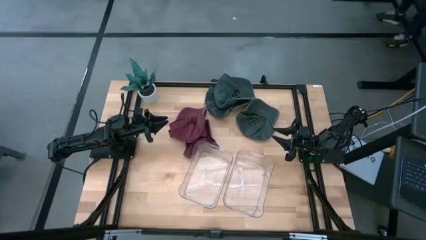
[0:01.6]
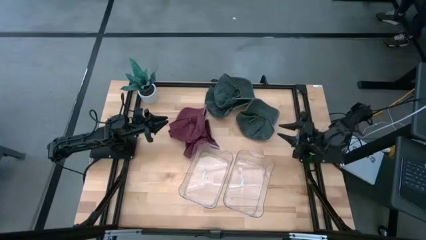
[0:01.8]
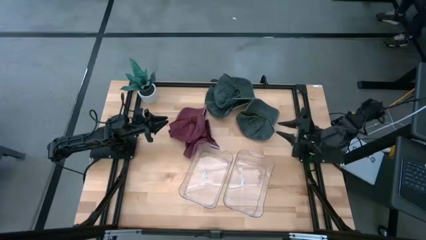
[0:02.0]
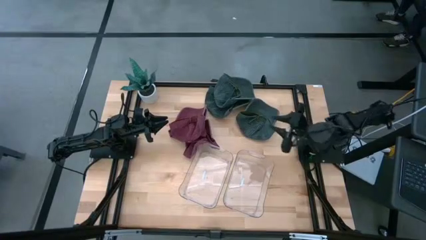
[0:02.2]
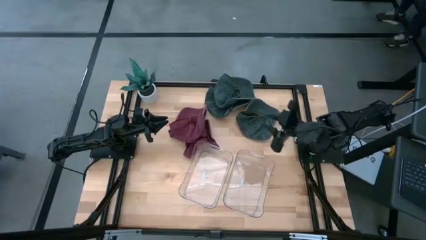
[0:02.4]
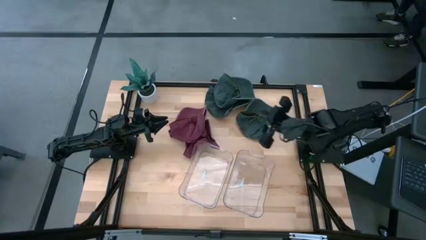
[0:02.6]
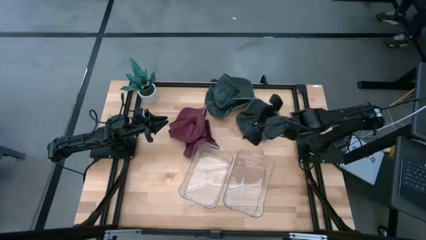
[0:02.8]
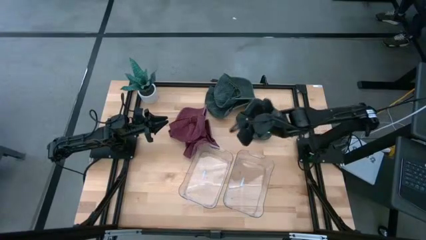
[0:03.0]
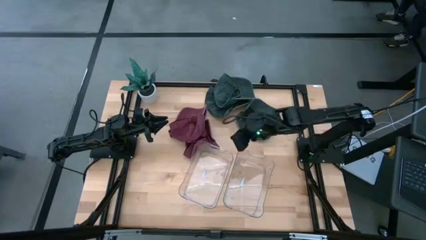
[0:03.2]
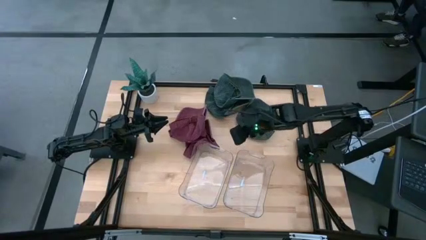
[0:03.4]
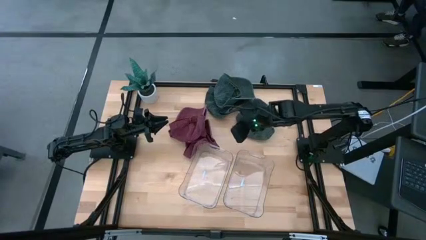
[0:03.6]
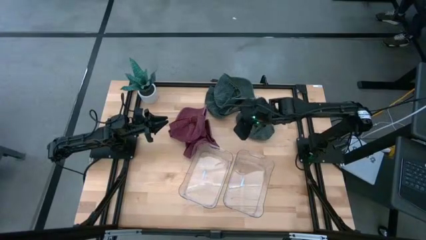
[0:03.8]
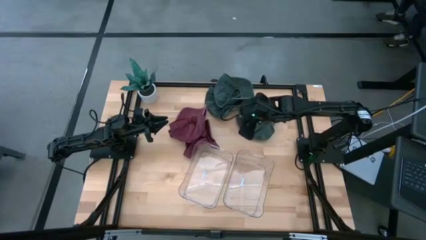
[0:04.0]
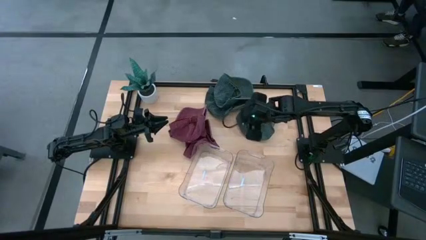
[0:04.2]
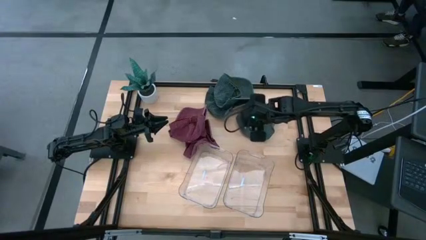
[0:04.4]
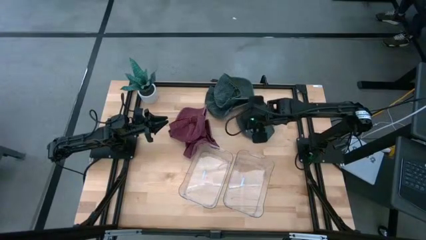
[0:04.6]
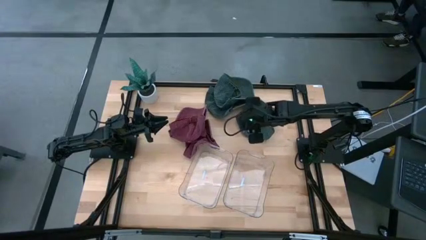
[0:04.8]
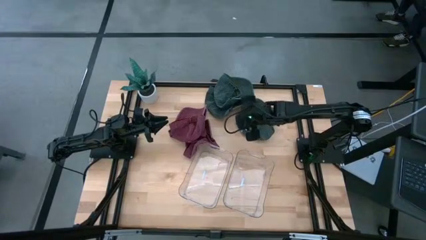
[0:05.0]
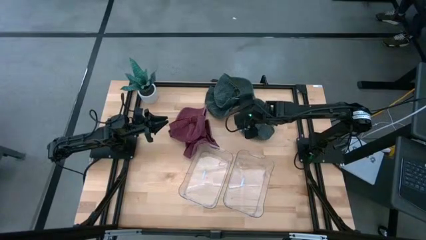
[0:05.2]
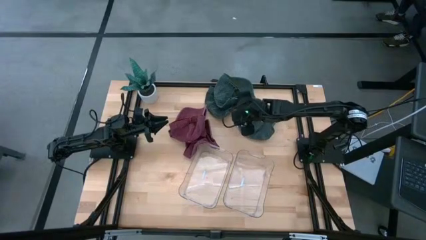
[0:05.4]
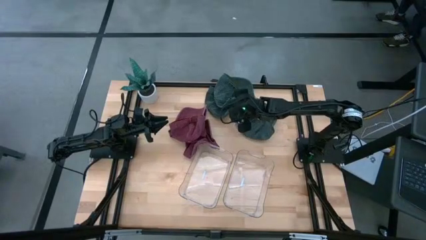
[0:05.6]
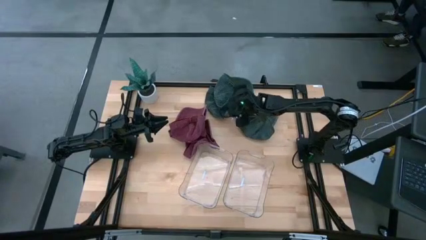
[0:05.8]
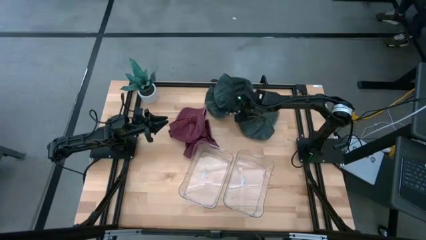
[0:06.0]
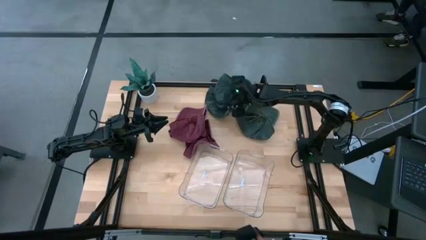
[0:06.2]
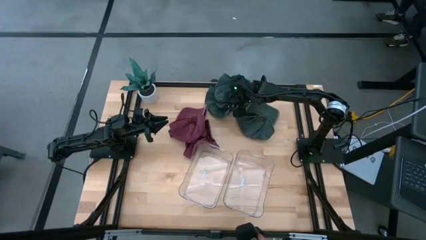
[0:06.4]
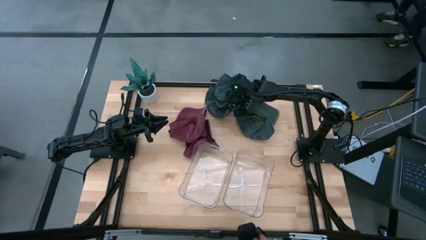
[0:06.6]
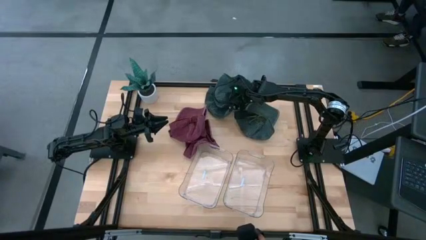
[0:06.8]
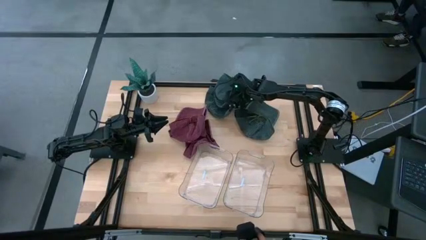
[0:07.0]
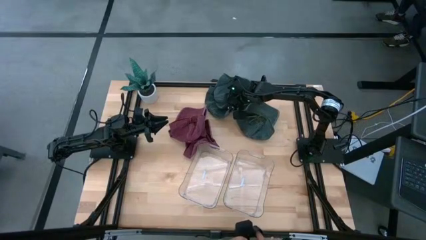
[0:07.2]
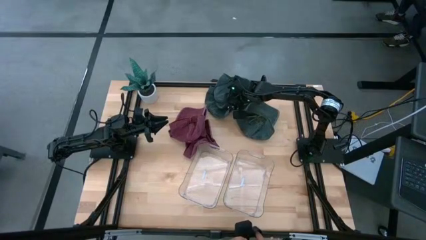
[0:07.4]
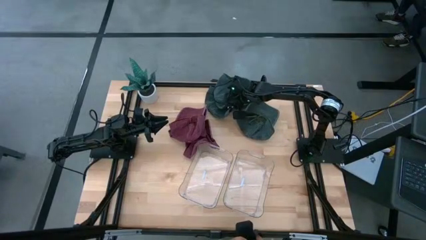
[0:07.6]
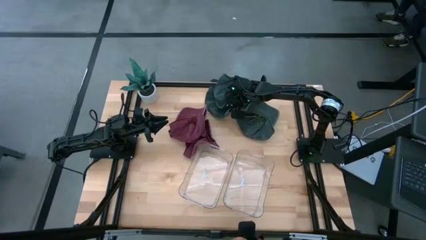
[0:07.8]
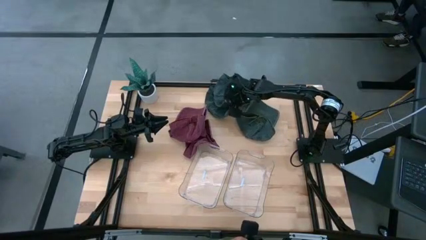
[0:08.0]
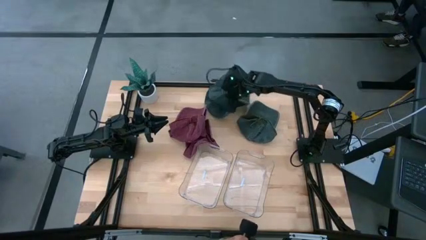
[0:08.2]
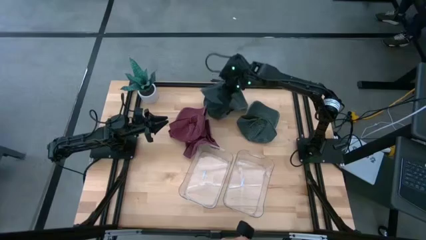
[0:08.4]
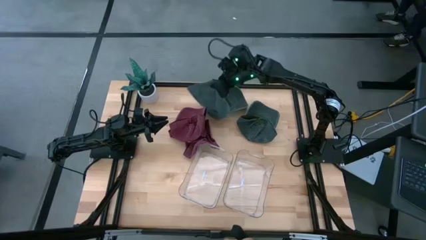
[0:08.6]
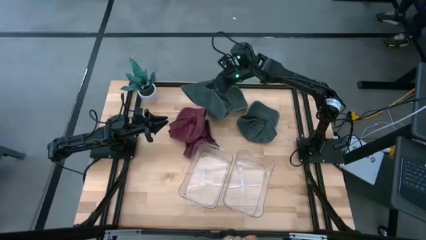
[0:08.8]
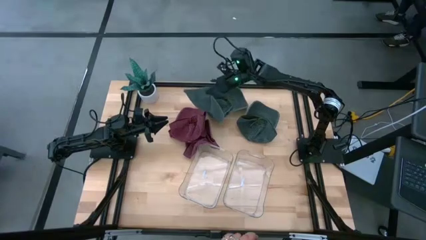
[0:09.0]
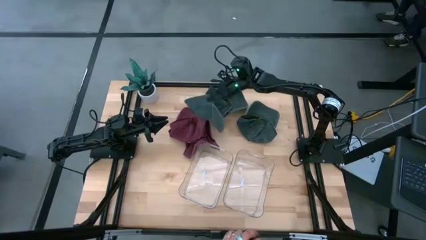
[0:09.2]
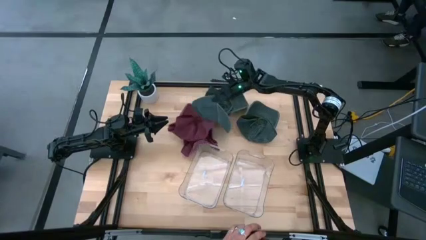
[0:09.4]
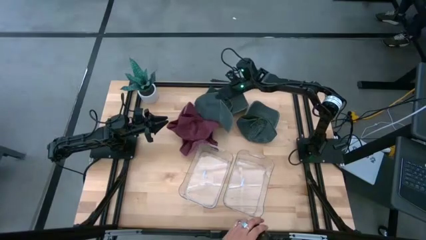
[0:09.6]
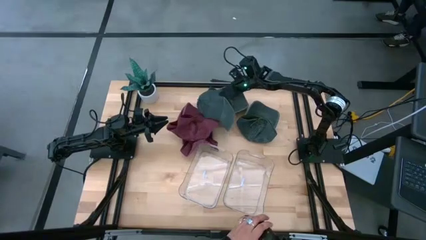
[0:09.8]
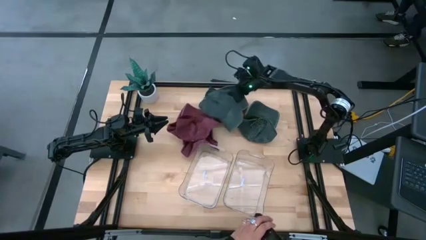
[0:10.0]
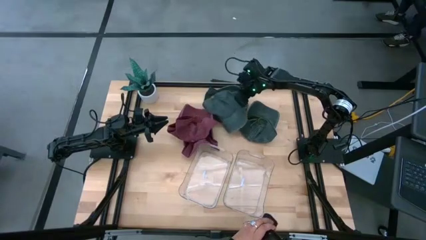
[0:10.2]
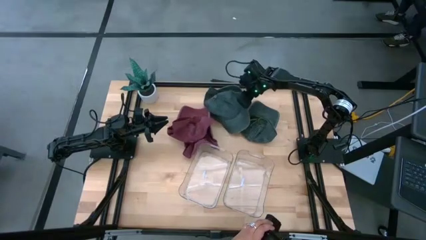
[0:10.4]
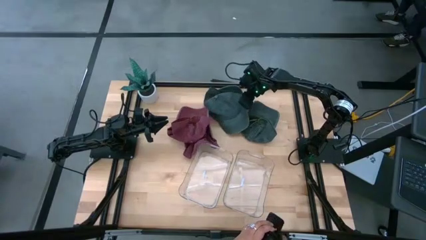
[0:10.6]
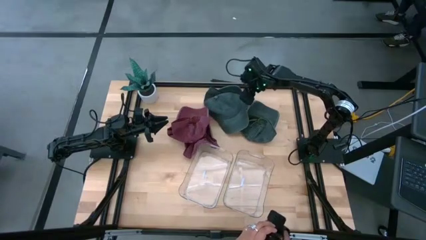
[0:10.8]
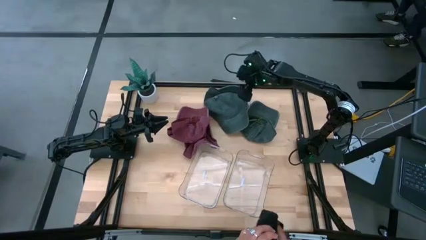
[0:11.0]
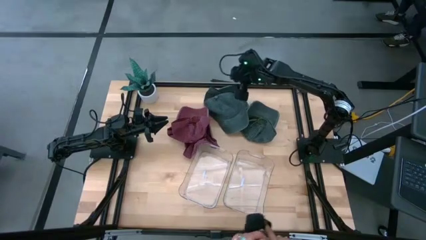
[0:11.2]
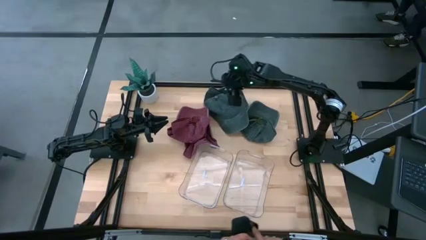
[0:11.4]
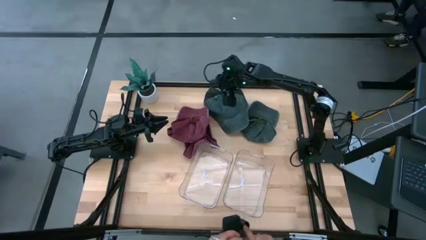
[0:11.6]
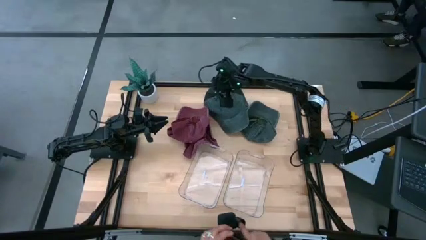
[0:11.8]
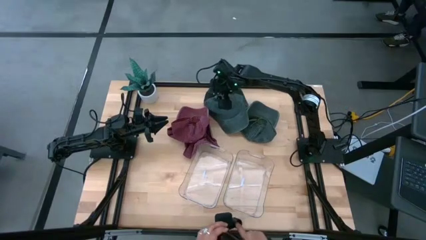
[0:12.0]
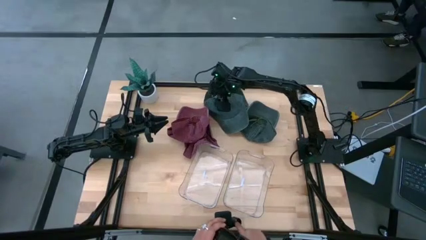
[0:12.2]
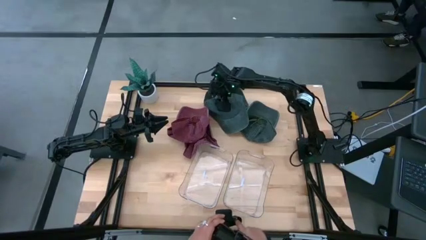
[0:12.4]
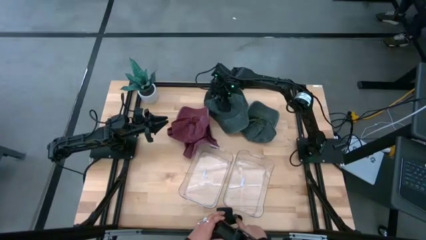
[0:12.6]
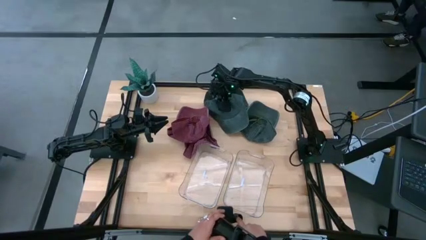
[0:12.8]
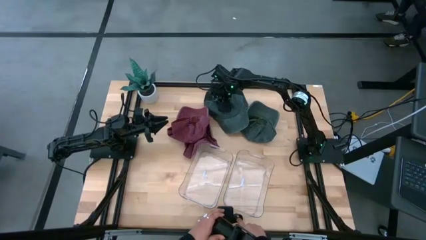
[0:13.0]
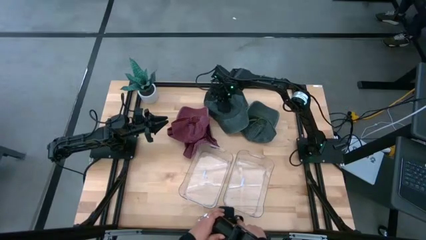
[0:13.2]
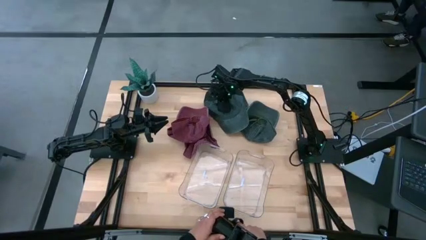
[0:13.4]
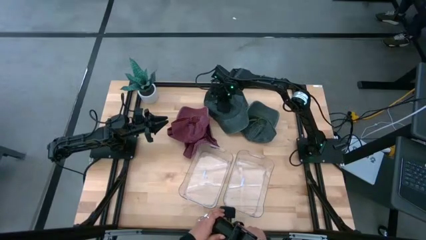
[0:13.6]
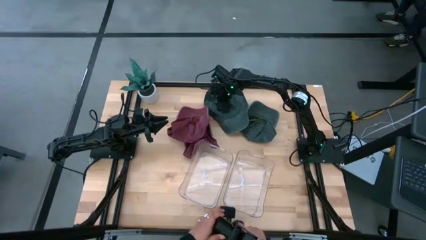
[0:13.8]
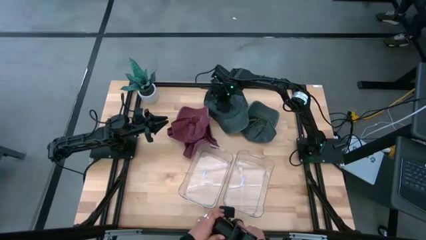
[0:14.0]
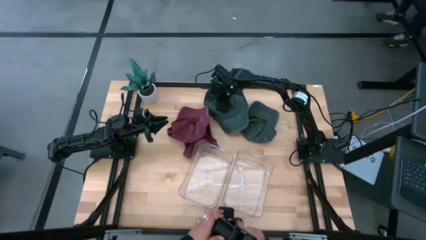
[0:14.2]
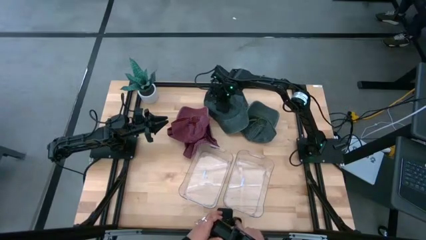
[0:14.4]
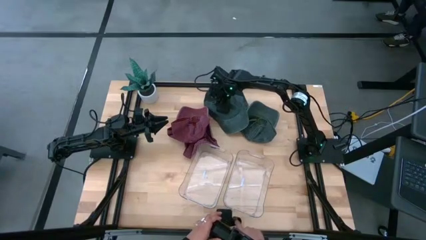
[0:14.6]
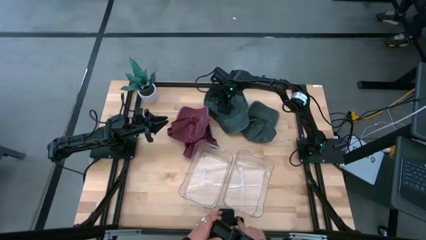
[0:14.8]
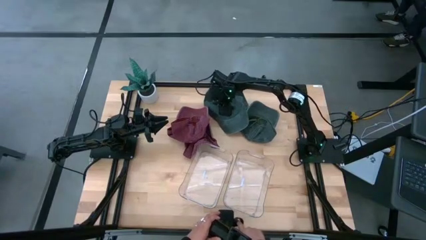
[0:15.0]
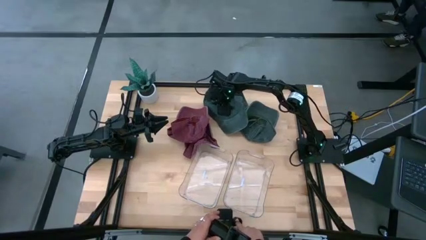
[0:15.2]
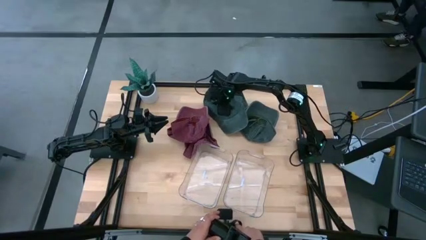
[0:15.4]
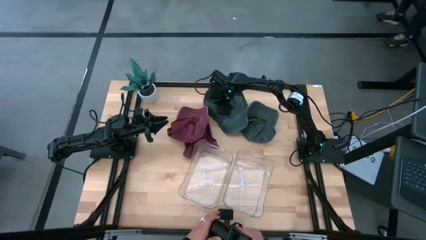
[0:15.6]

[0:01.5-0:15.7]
Task: Pick & Place hat
Put the top gray cap into the right transparent bin
